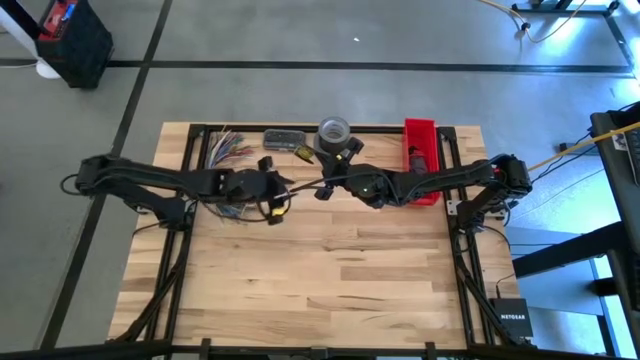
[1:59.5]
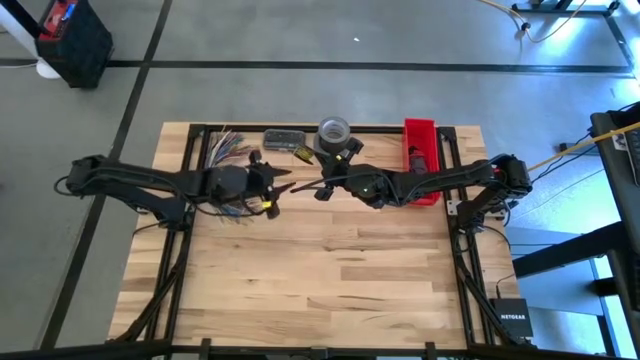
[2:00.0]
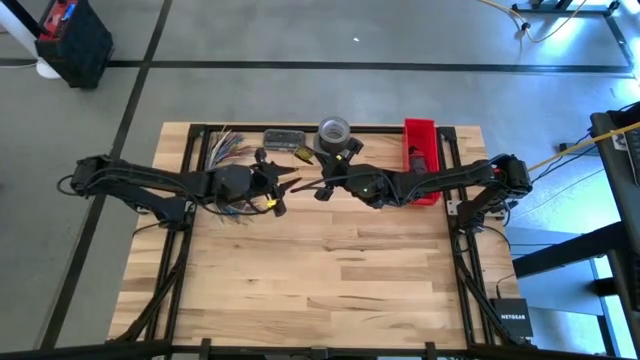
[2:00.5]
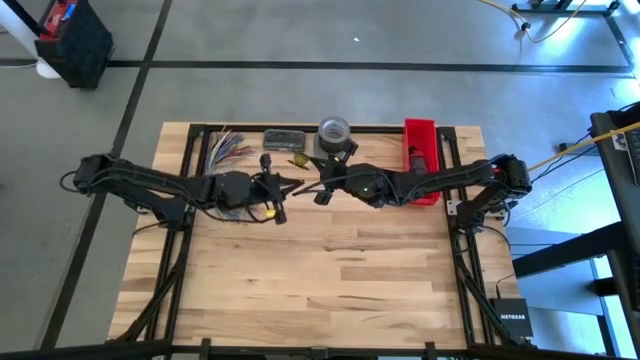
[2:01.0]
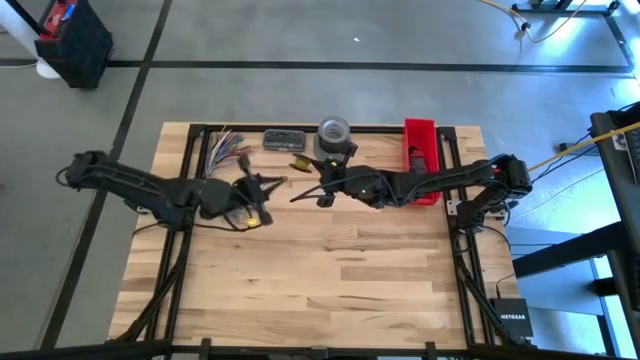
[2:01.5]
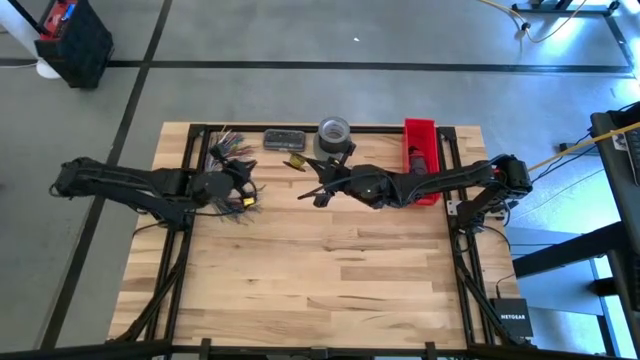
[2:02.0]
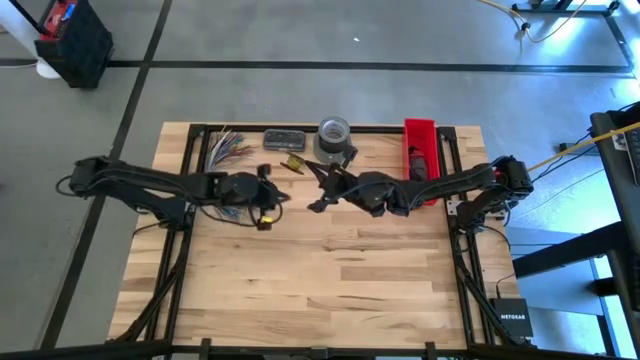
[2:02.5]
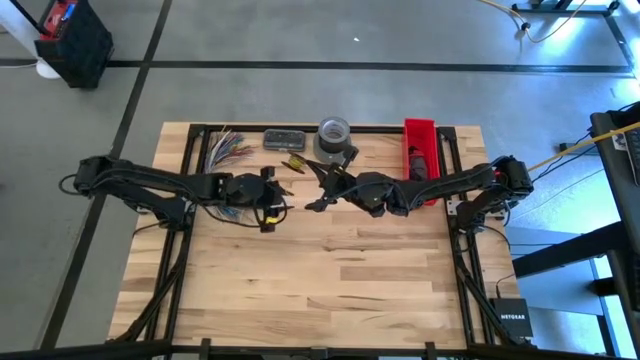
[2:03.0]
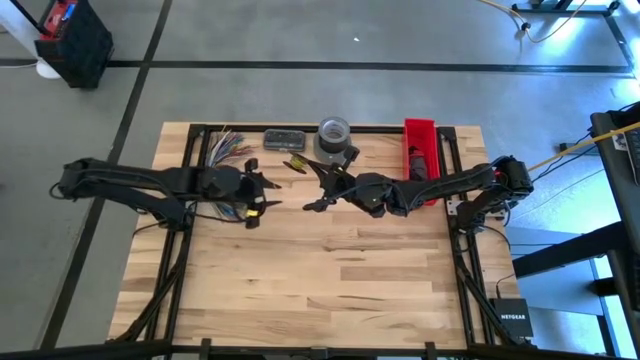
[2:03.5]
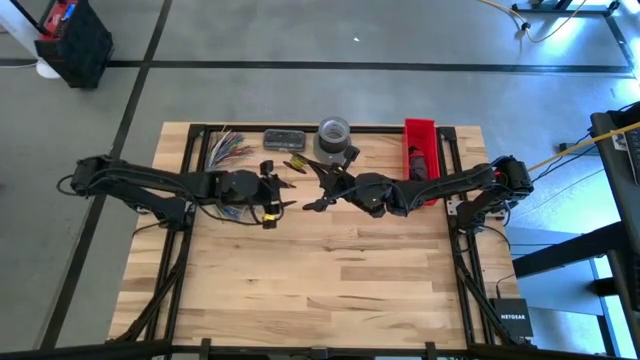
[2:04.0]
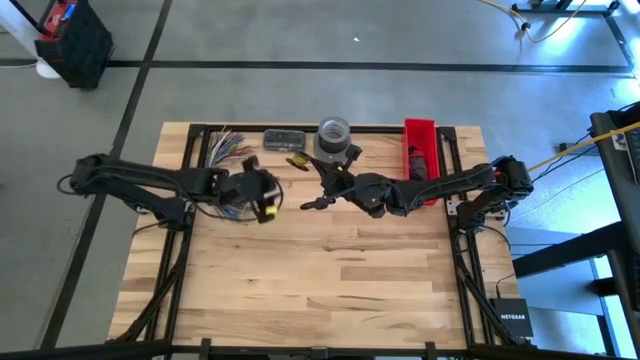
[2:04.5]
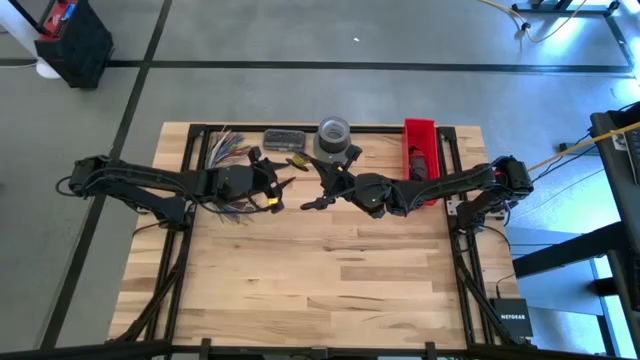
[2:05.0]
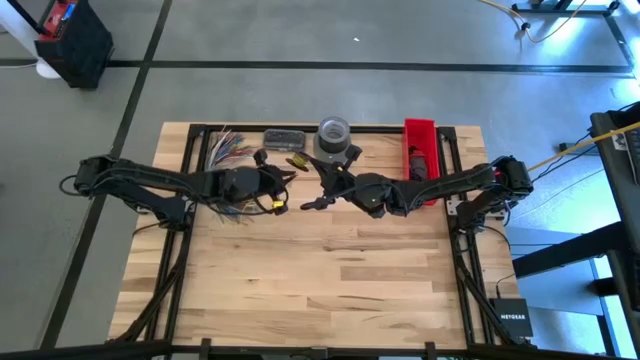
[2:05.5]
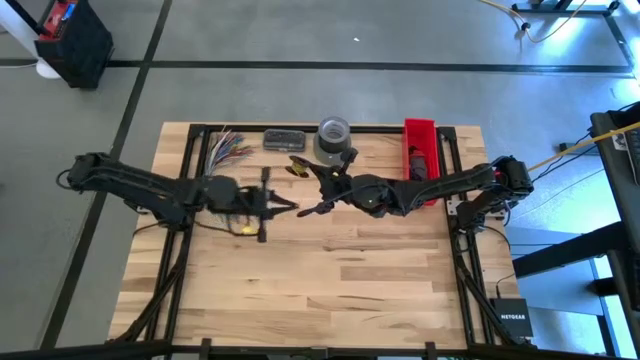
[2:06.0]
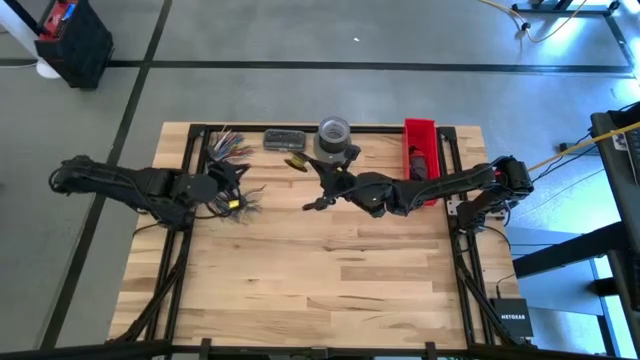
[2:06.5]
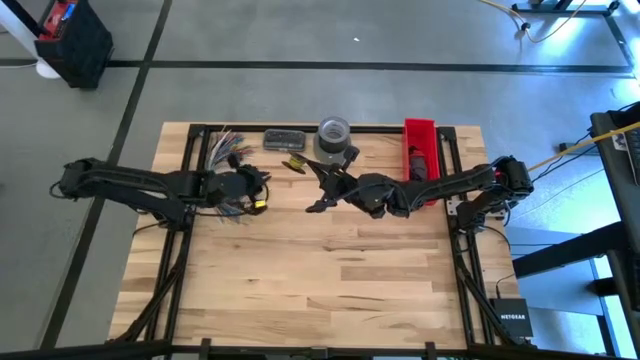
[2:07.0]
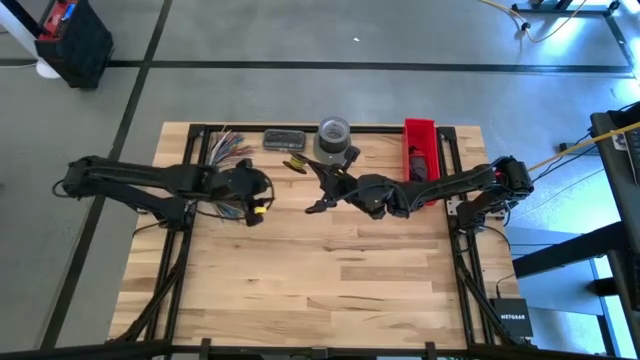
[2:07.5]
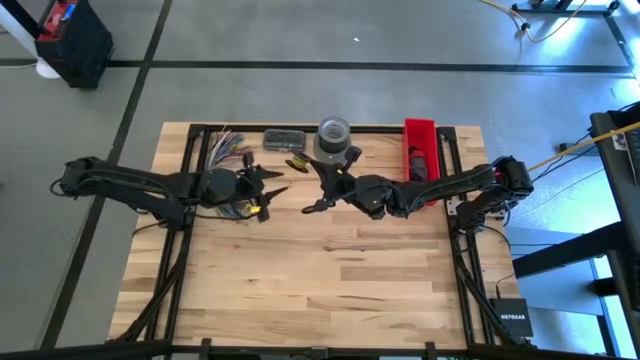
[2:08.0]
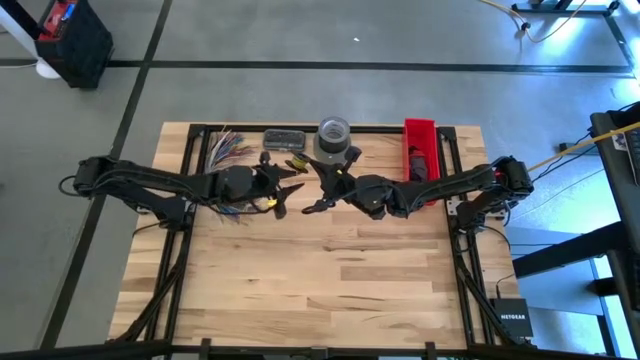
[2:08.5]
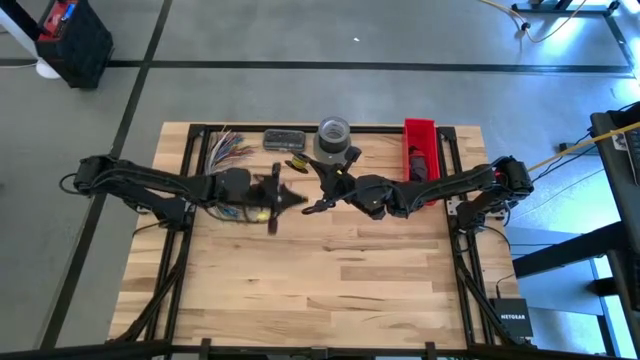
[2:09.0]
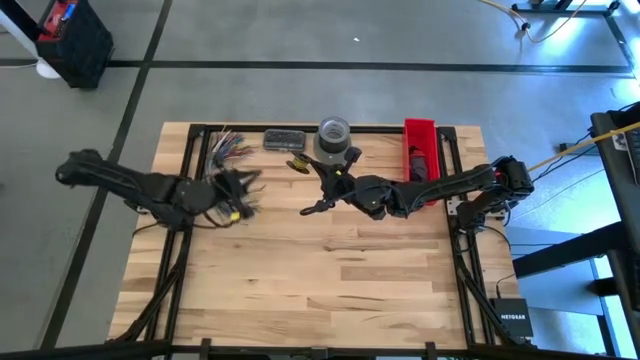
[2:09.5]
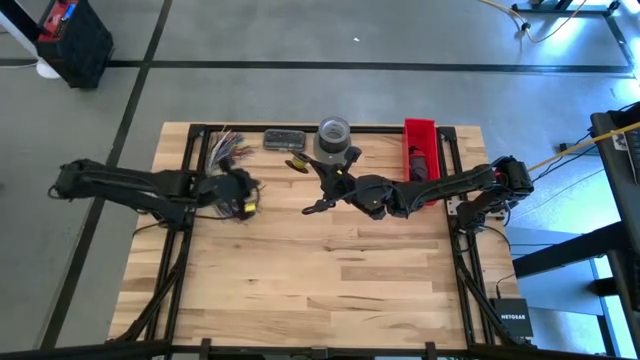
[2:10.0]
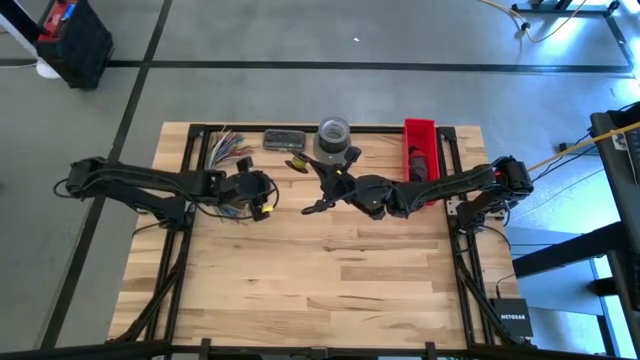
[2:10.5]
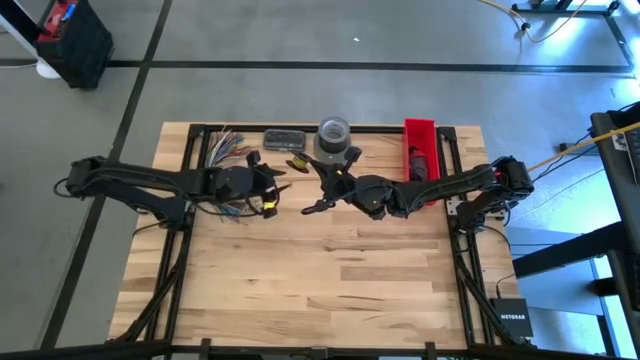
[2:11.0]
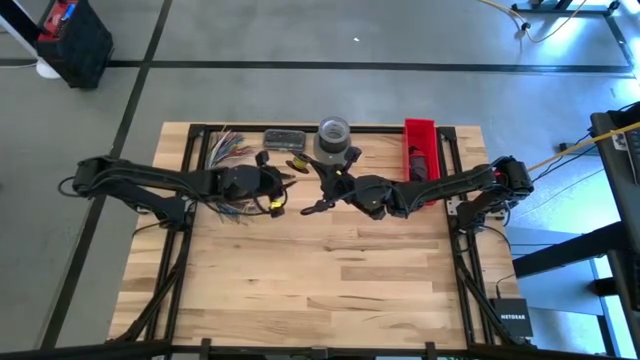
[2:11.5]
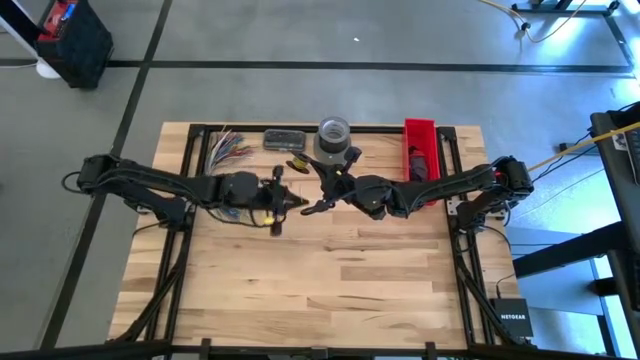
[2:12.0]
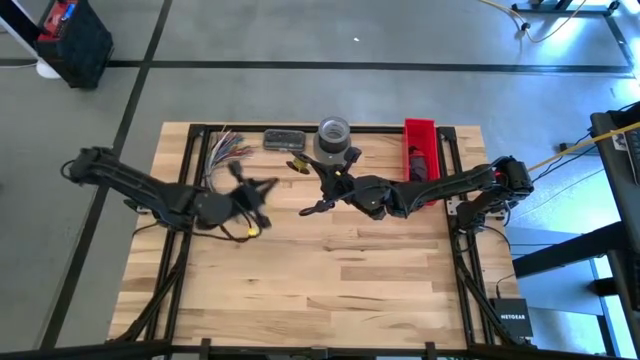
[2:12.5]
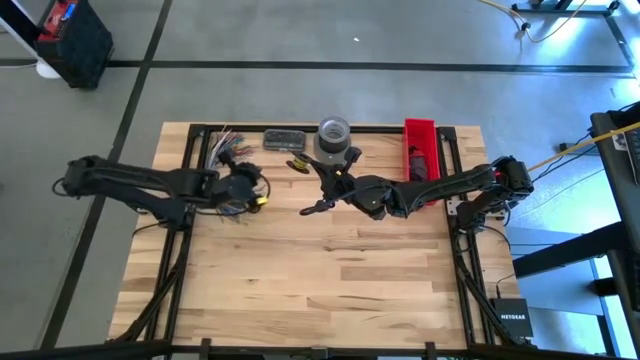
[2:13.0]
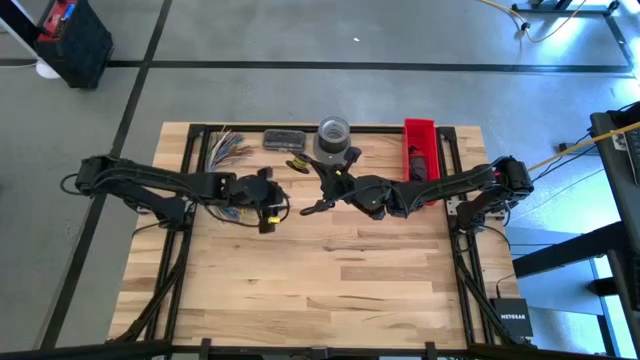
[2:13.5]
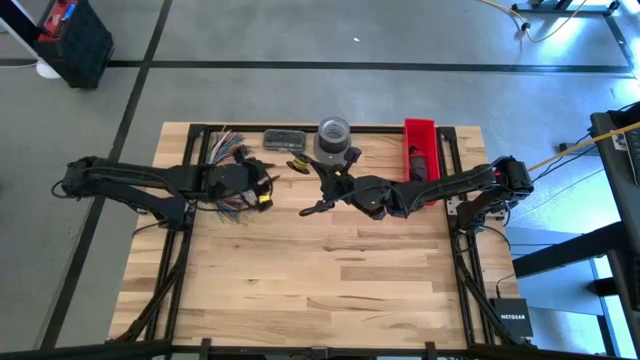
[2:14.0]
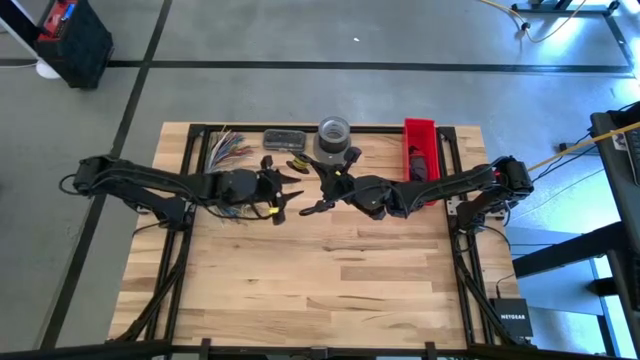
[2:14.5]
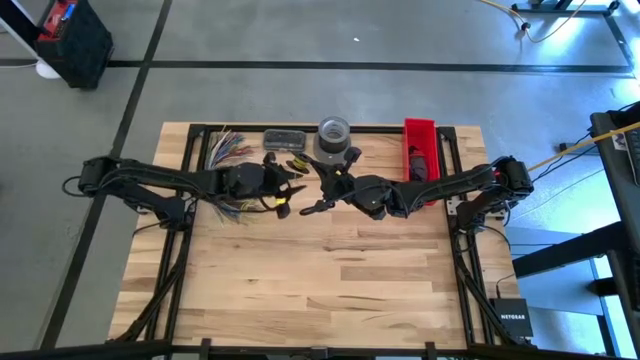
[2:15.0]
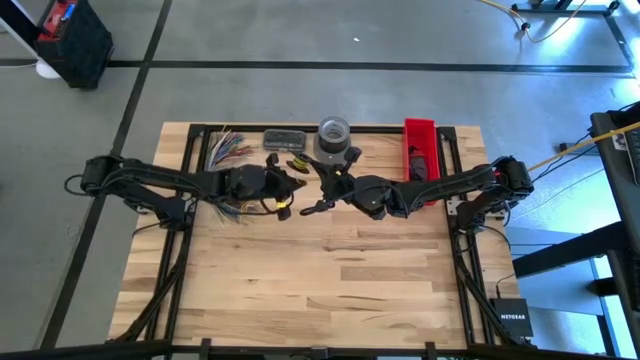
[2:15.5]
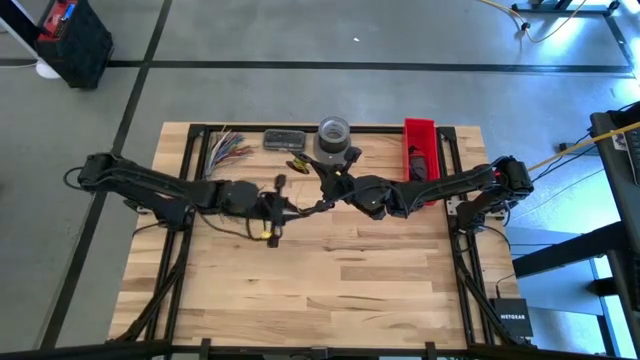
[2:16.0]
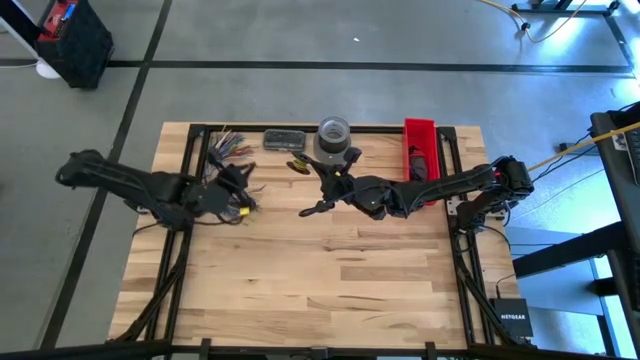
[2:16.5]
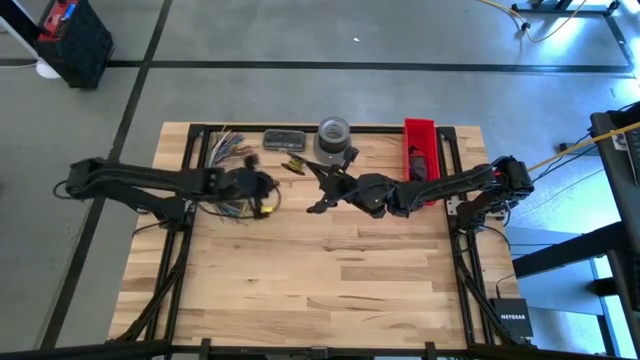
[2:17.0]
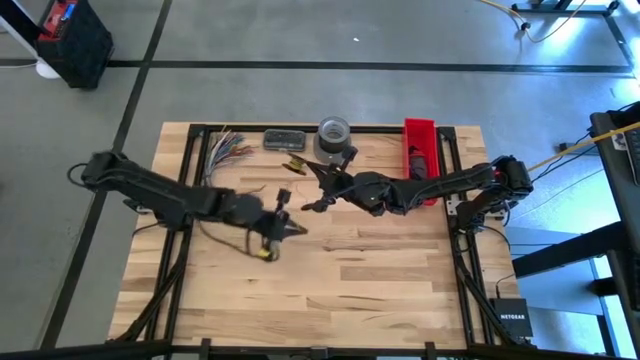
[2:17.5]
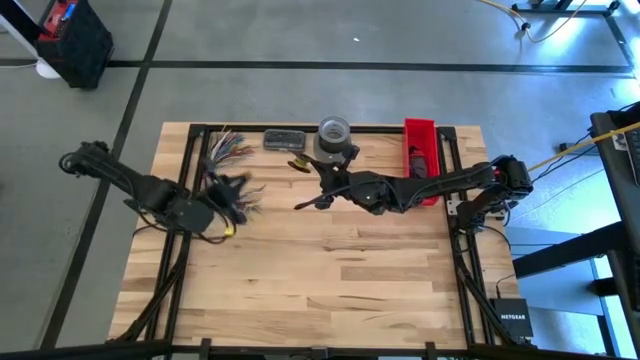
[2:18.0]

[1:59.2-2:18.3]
Task: Coil cords
Uncoil the yellow wire from the spool

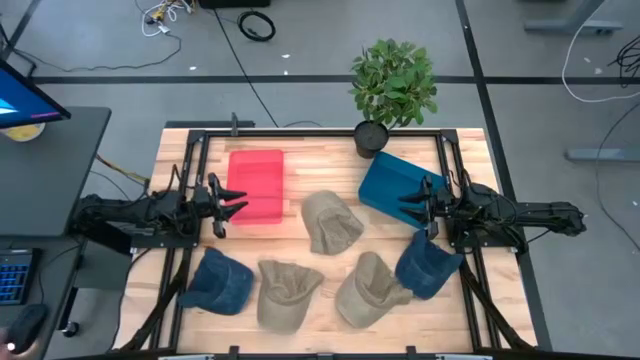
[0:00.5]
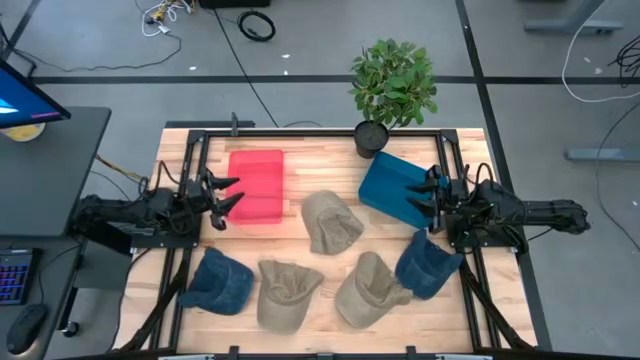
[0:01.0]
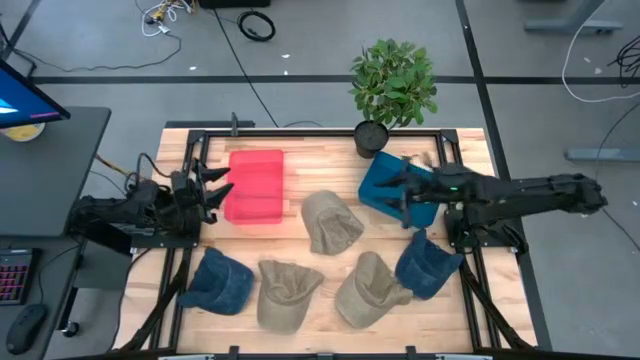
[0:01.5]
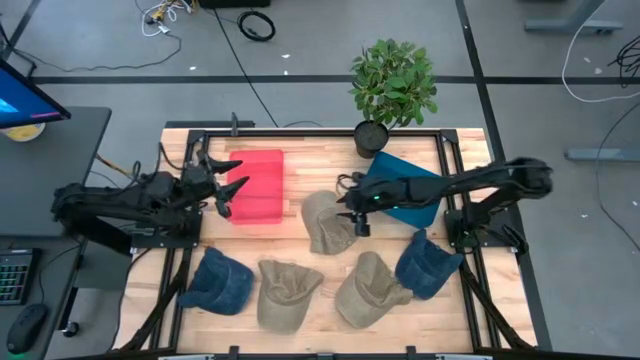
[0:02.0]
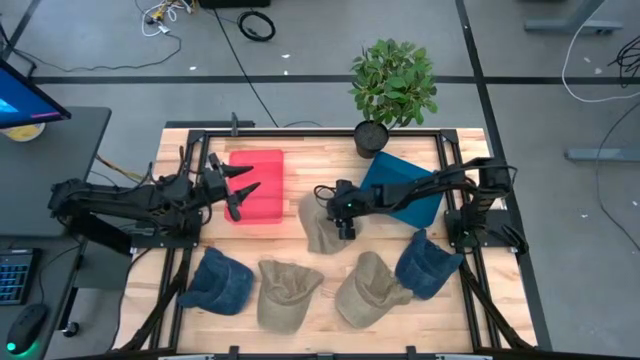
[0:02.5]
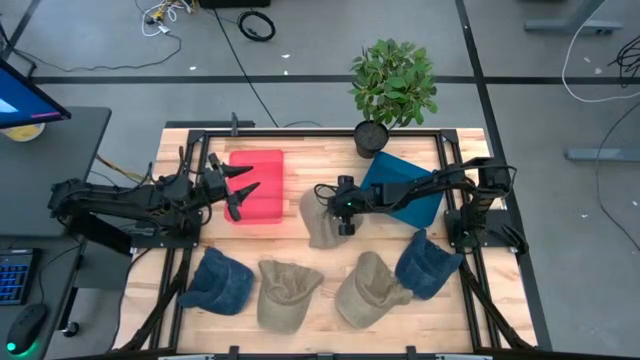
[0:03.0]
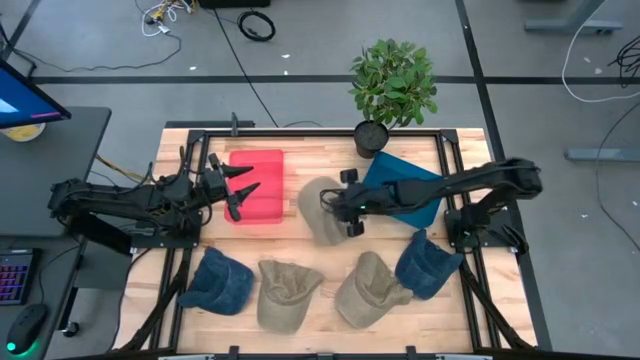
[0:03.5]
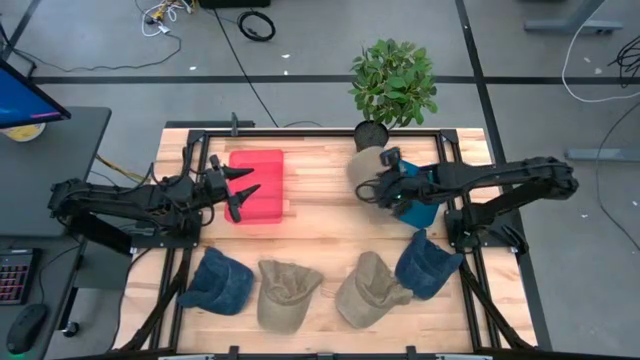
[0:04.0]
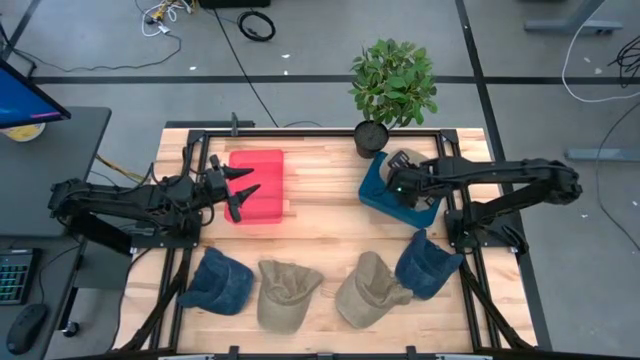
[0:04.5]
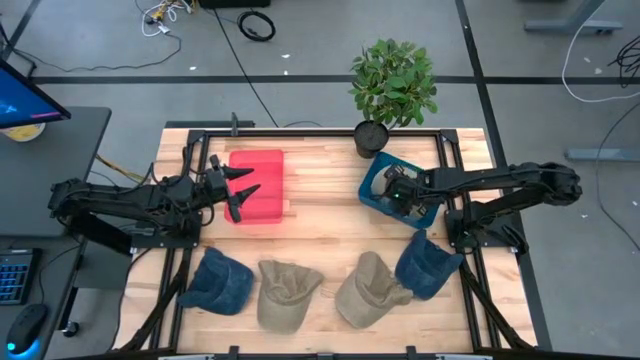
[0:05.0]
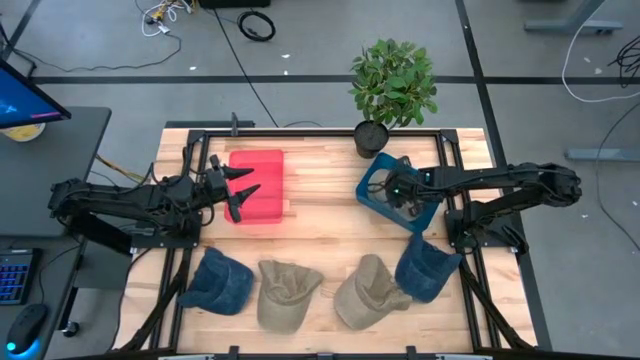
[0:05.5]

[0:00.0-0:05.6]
Task: Pick & Place hat
Put the top brown cap into the blue bin
